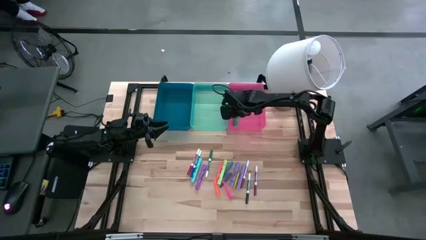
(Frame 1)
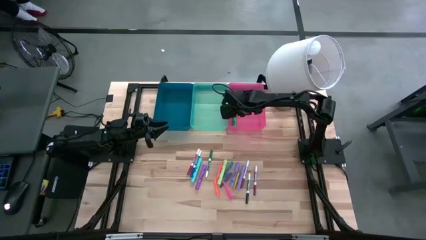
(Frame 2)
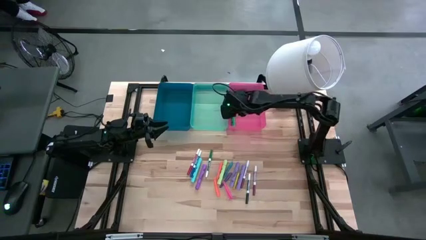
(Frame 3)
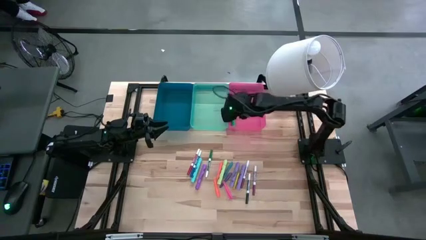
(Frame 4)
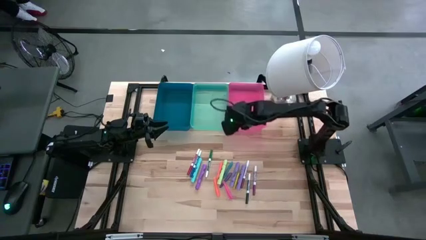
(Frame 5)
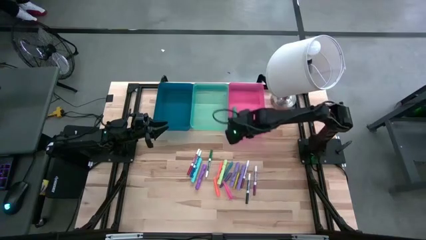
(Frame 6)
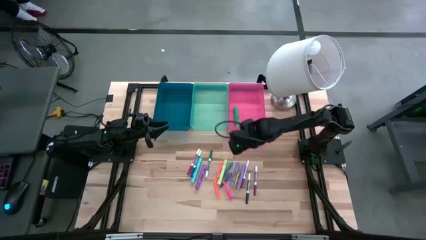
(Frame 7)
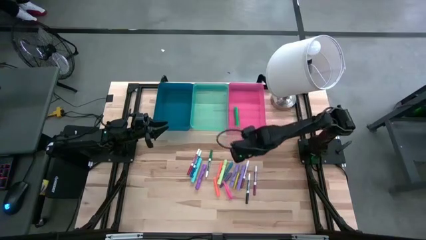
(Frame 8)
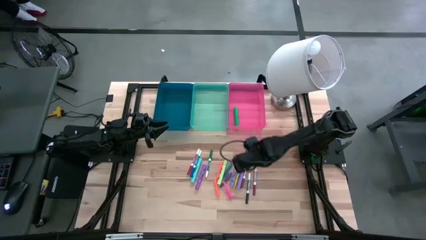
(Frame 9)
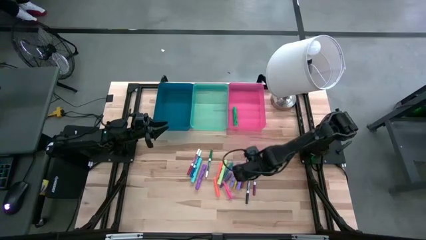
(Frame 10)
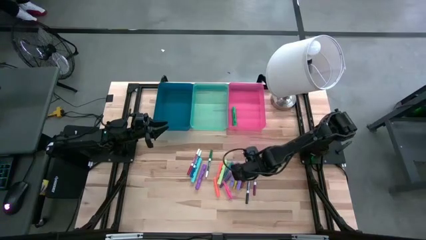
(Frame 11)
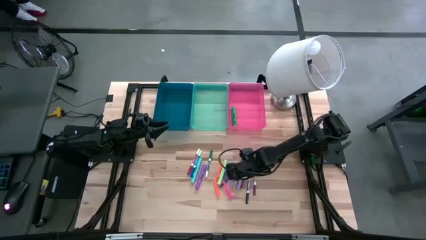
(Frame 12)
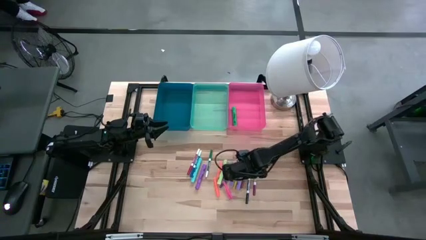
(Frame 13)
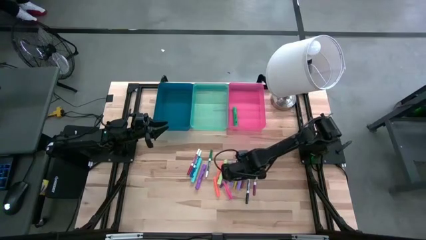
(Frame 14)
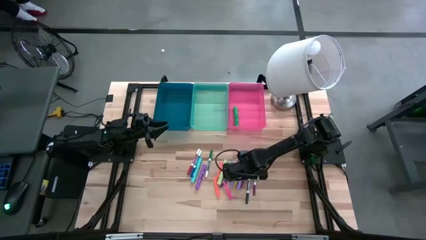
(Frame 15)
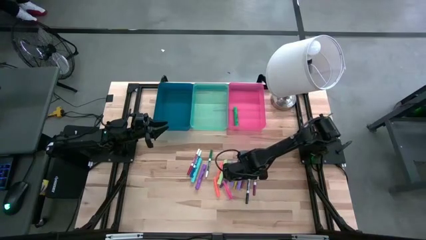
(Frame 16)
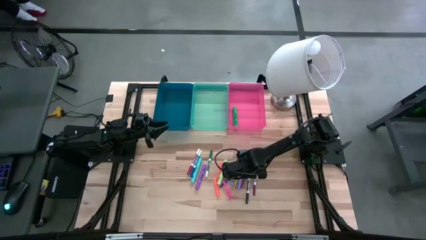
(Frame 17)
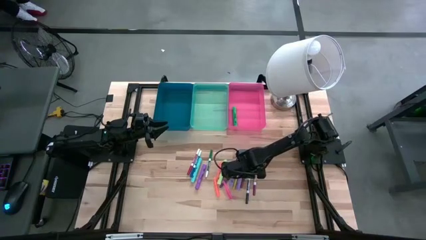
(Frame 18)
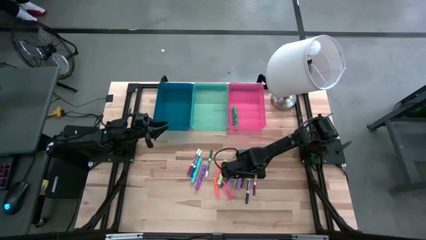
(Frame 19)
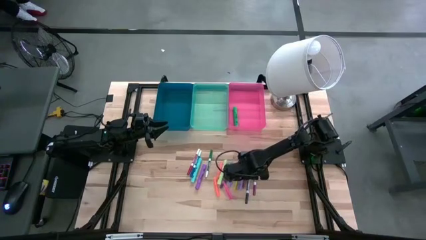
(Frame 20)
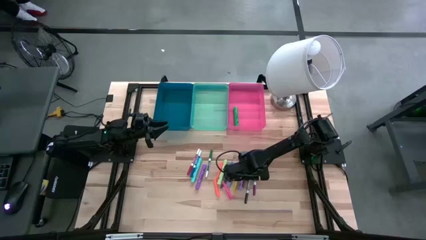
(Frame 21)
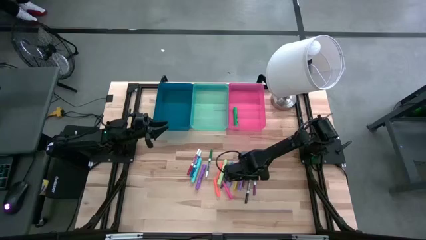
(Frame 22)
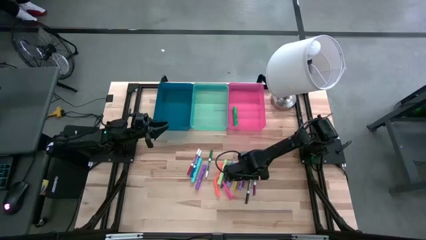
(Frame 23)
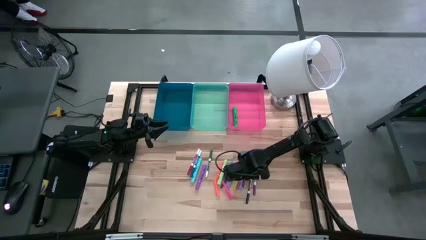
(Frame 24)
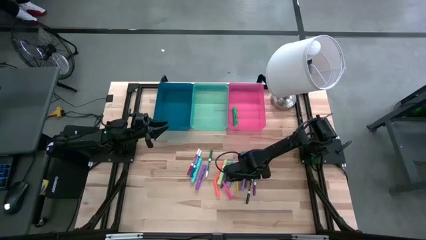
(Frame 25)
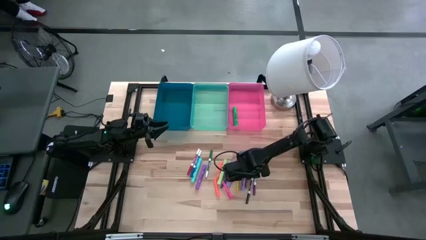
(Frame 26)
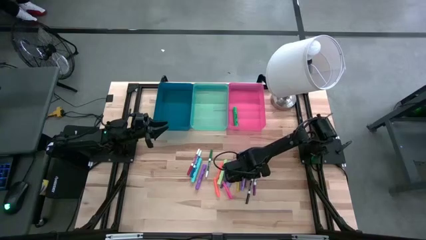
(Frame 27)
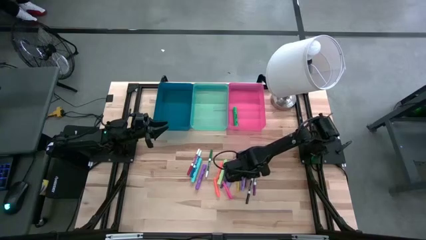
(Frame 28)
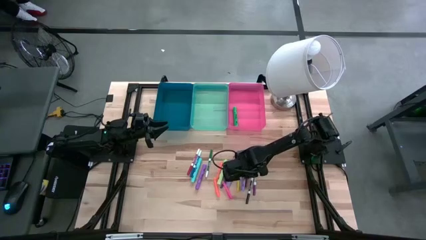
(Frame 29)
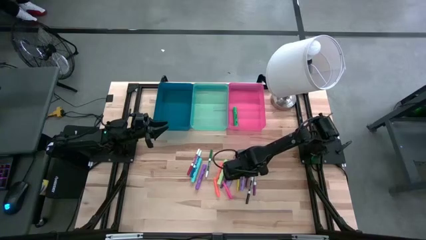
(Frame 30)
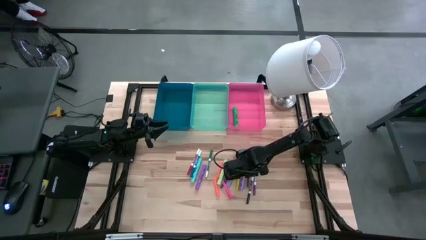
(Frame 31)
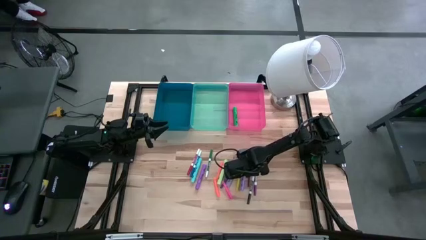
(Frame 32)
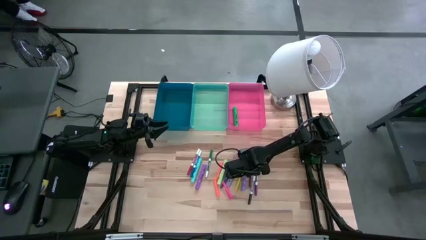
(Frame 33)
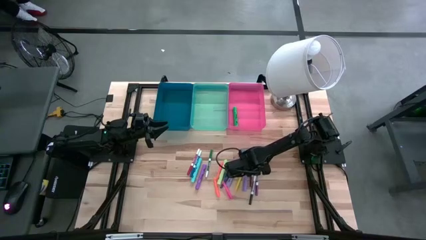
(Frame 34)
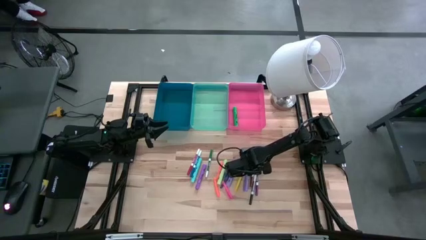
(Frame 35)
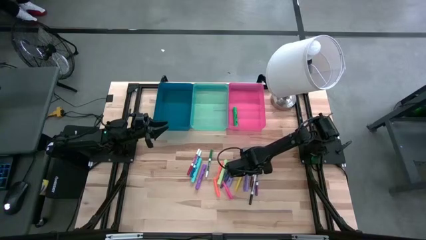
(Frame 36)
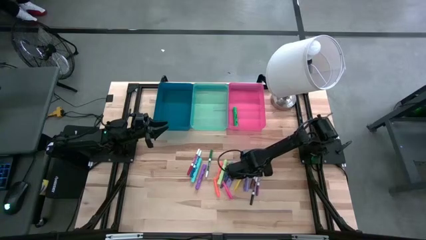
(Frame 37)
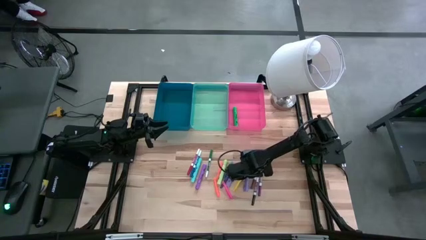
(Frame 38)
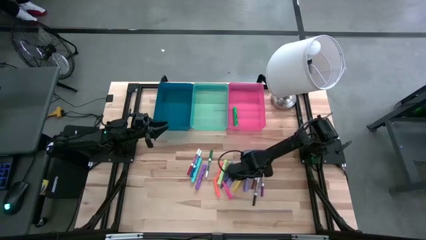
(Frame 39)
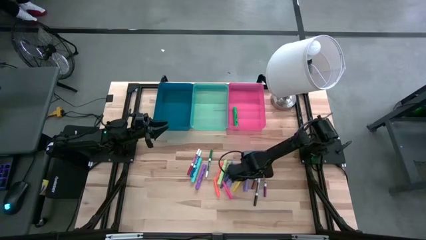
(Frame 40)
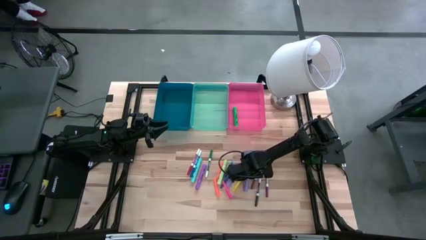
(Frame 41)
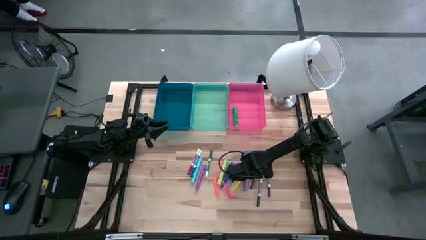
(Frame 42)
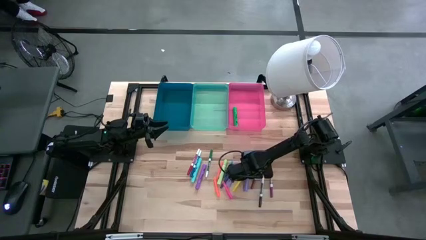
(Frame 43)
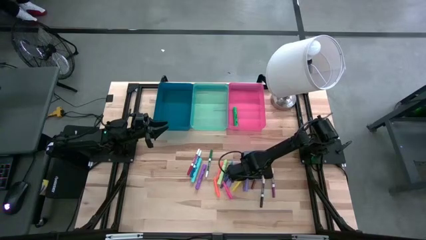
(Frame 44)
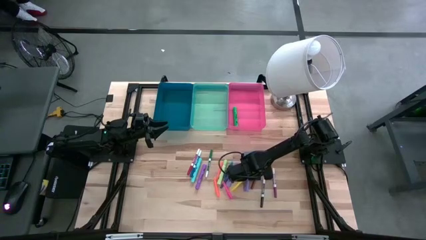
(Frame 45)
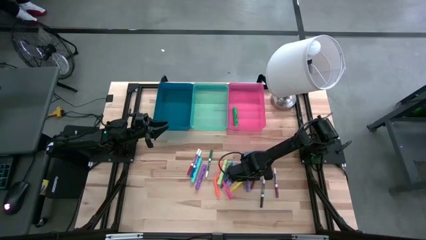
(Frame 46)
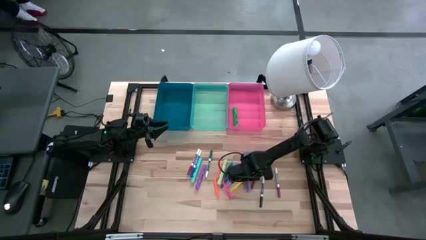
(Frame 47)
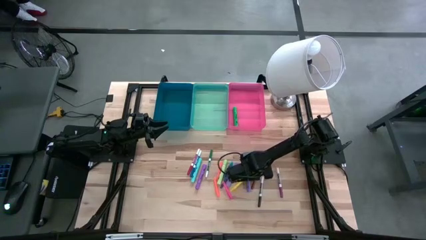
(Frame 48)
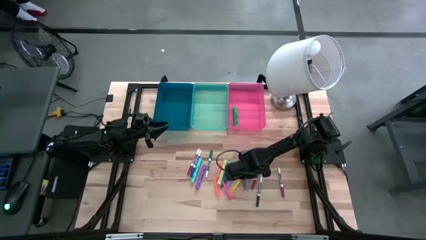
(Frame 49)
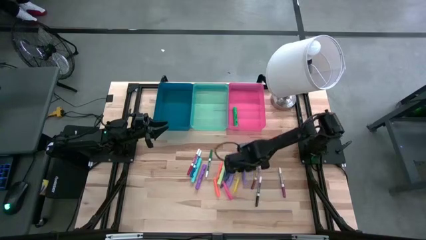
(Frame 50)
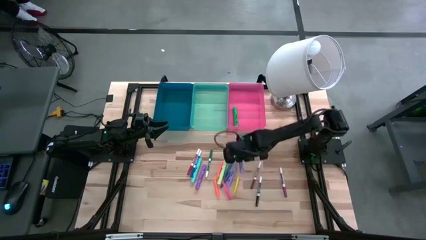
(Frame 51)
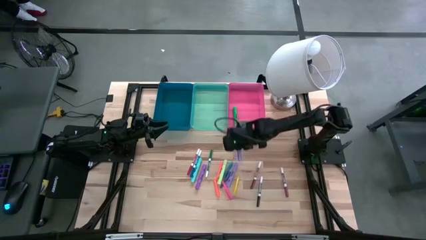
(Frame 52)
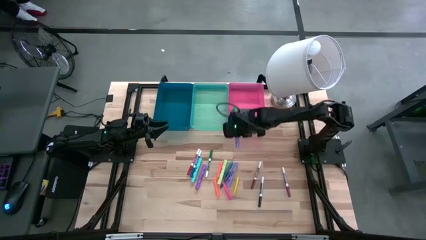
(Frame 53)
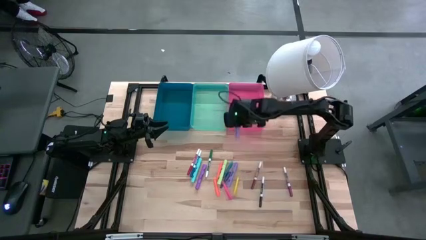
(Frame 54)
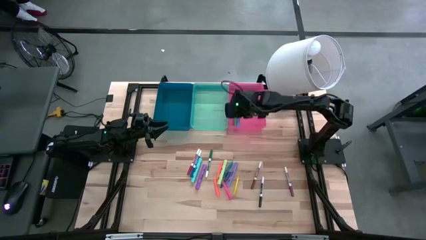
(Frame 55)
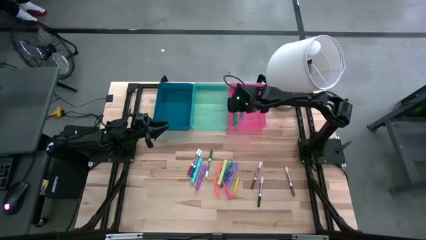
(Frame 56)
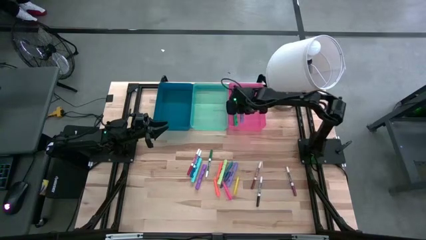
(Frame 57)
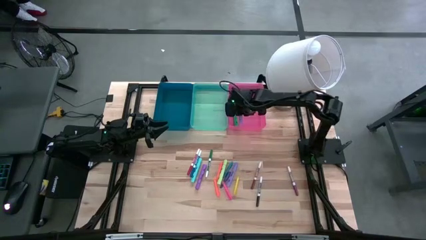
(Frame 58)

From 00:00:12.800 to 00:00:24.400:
Task: Pick & Place Markers
Put the right purple highlighter pen into the pink bin

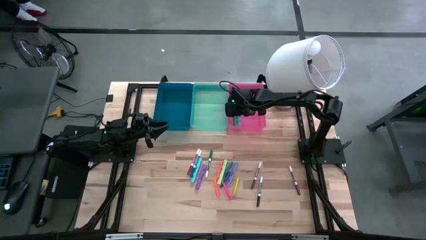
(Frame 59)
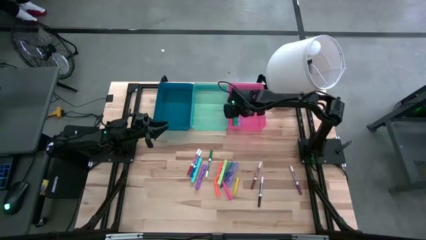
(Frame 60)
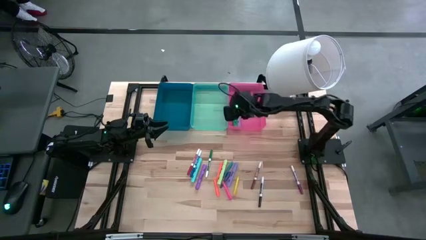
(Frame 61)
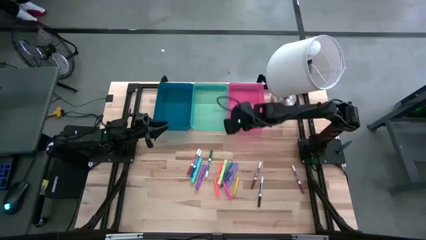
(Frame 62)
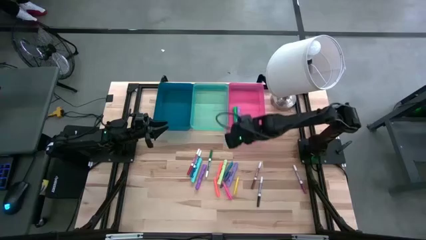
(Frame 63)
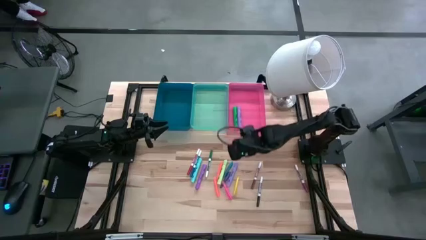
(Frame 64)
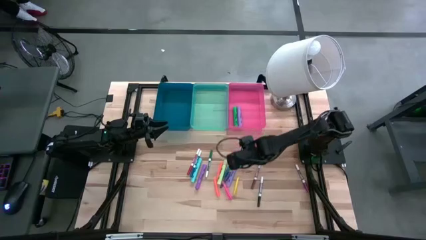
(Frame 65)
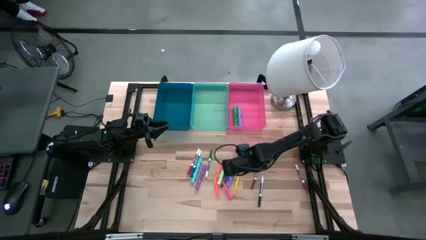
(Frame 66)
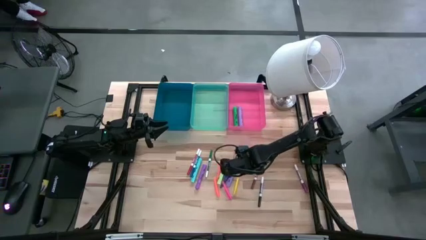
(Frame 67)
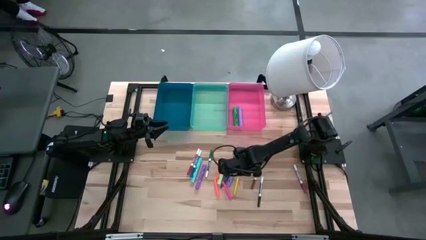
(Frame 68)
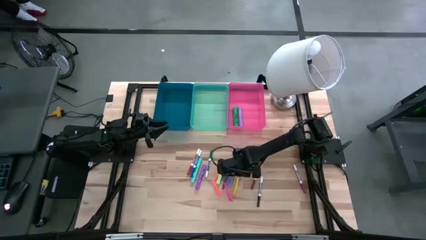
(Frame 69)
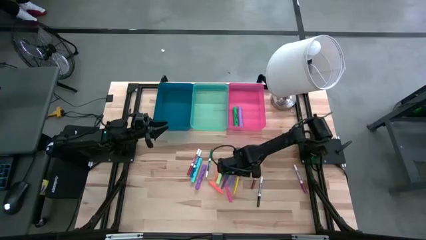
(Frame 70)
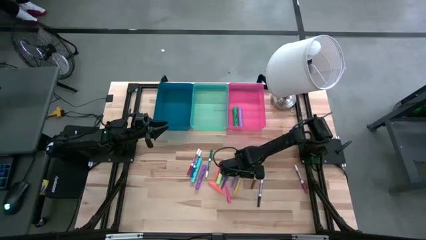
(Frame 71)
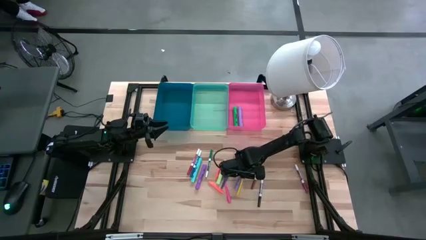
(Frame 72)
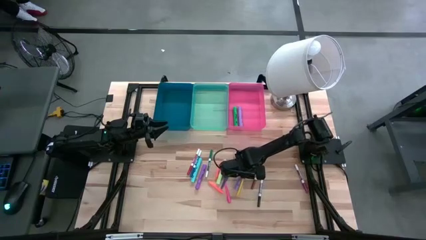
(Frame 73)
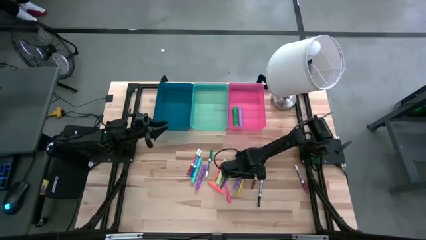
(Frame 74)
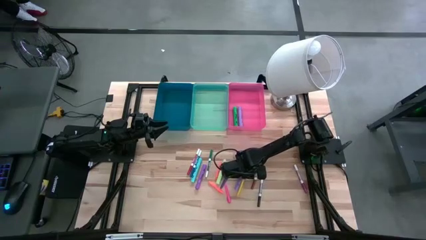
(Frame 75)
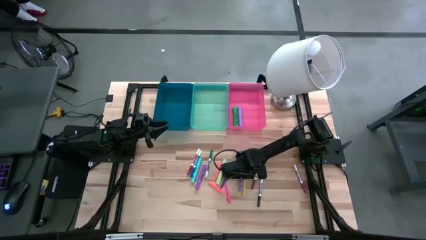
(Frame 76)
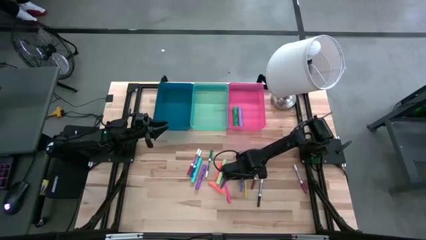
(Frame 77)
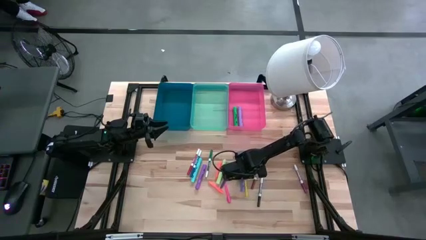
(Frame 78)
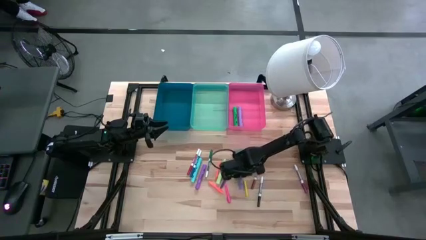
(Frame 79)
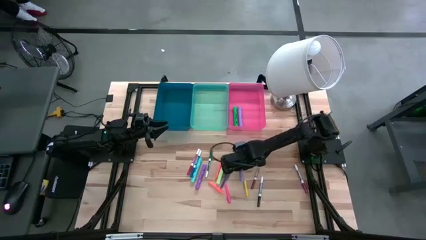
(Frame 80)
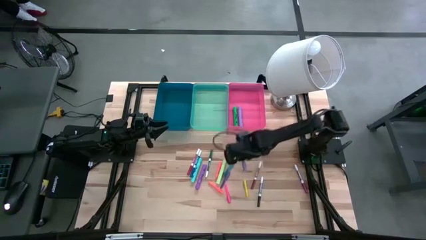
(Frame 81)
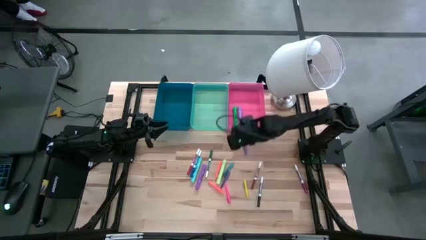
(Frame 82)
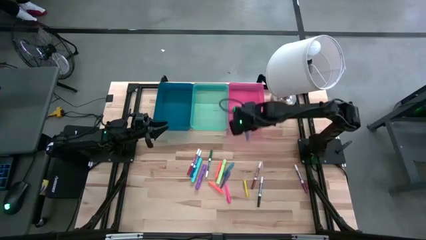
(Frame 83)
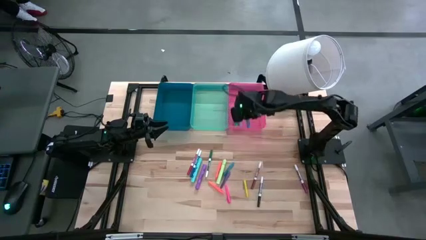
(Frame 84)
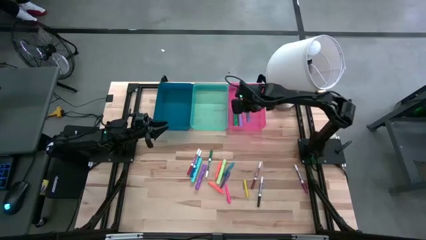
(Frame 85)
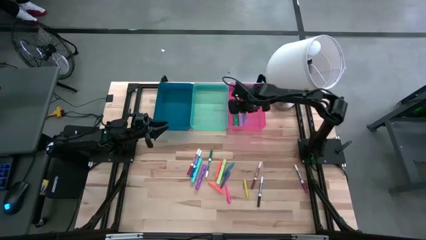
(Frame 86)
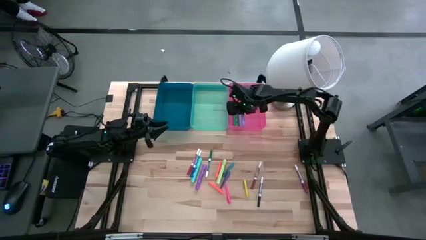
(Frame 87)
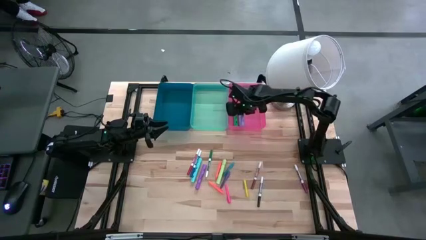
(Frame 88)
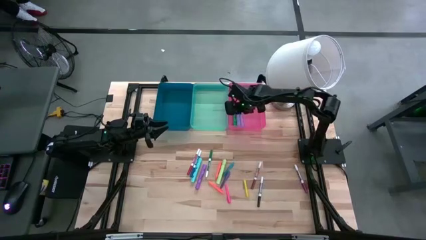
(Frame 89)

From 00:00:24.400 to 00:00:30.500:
Put the right purple highlighter pen into the pink bin
